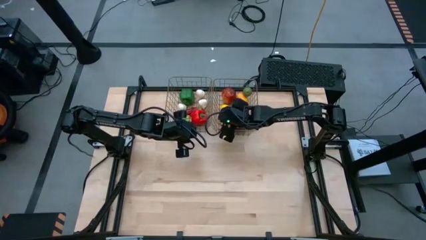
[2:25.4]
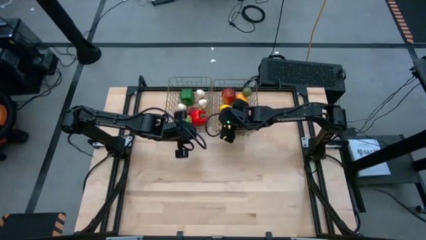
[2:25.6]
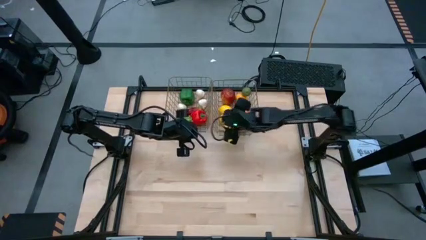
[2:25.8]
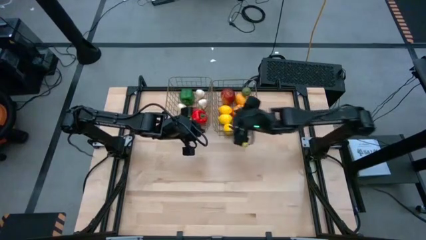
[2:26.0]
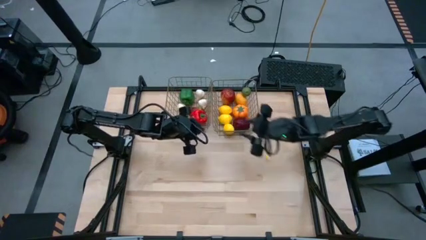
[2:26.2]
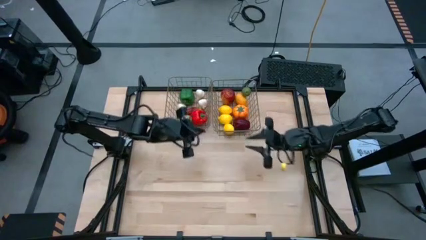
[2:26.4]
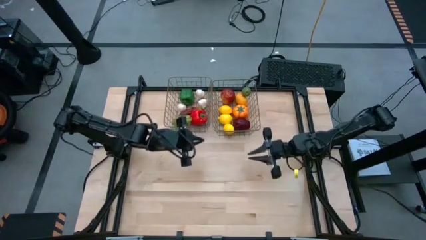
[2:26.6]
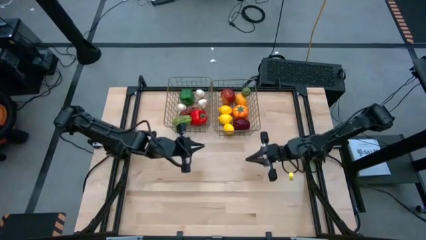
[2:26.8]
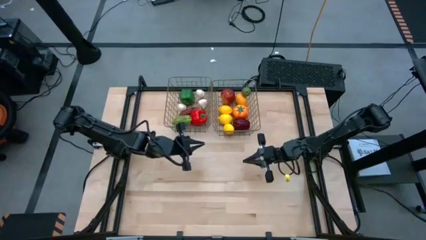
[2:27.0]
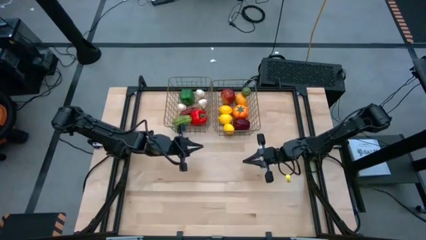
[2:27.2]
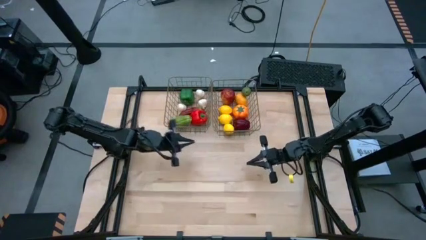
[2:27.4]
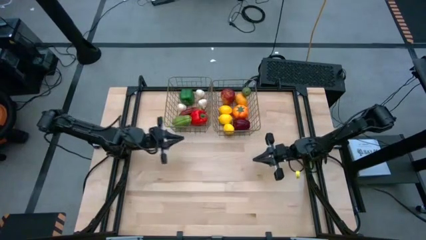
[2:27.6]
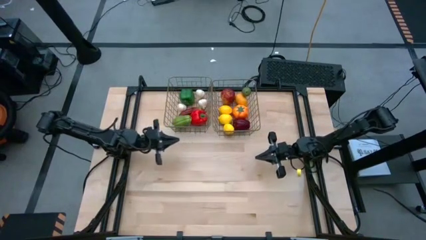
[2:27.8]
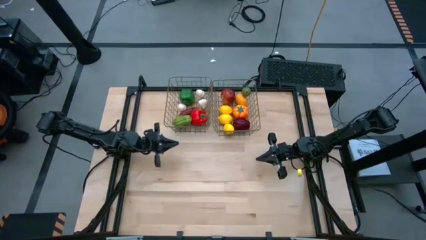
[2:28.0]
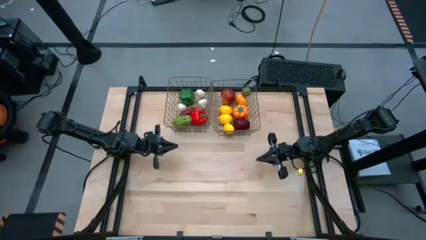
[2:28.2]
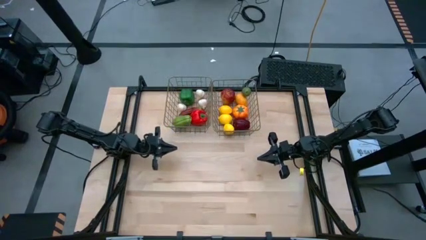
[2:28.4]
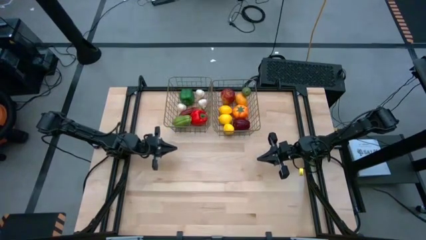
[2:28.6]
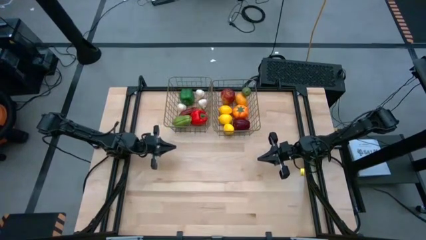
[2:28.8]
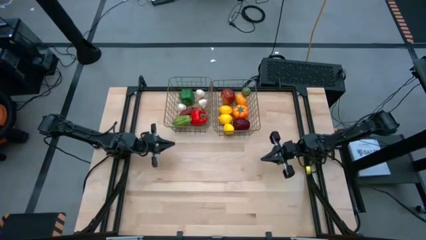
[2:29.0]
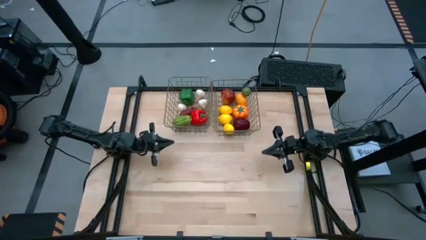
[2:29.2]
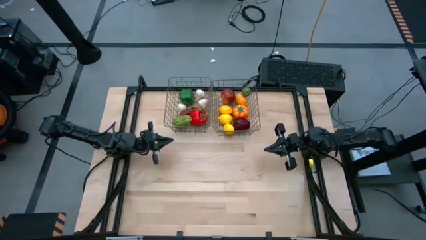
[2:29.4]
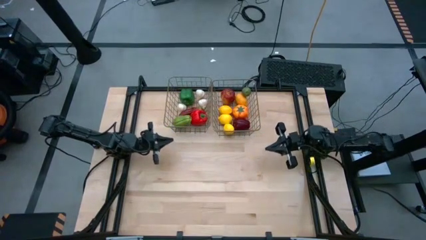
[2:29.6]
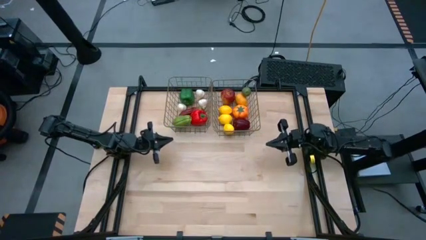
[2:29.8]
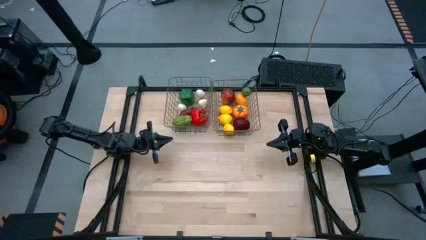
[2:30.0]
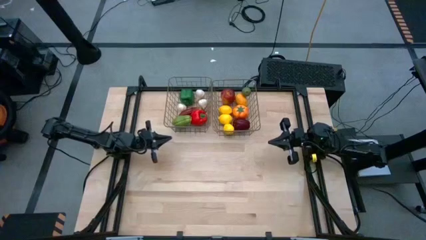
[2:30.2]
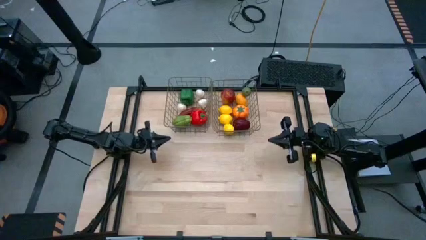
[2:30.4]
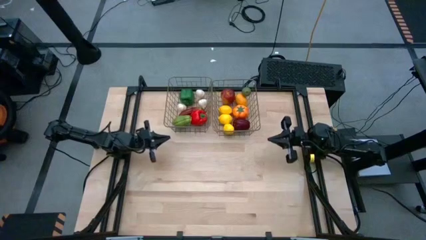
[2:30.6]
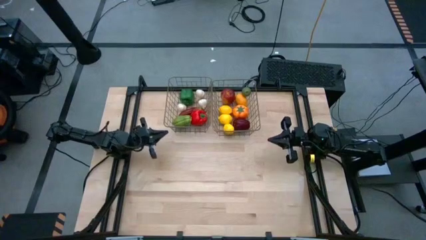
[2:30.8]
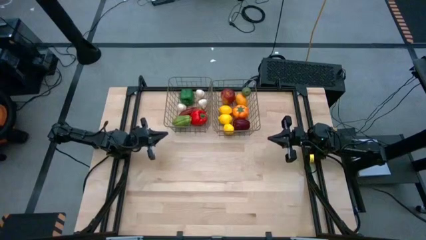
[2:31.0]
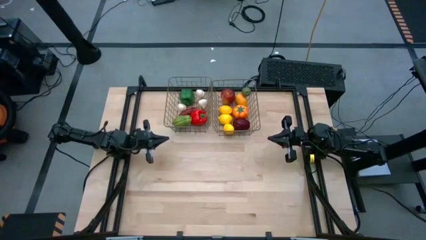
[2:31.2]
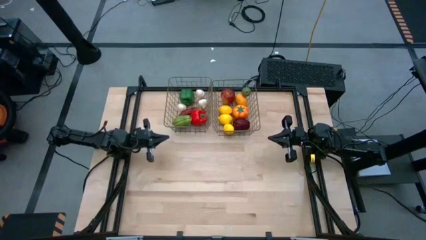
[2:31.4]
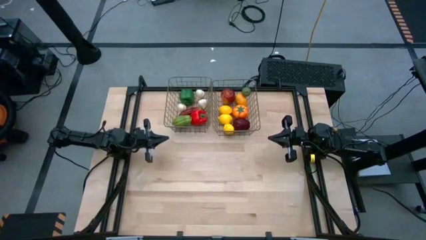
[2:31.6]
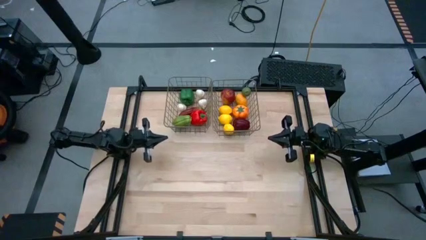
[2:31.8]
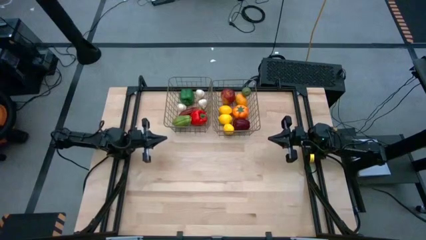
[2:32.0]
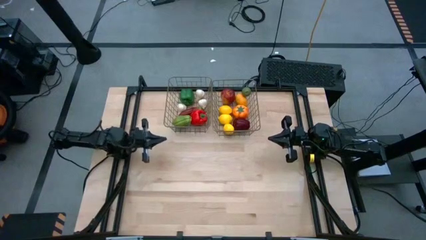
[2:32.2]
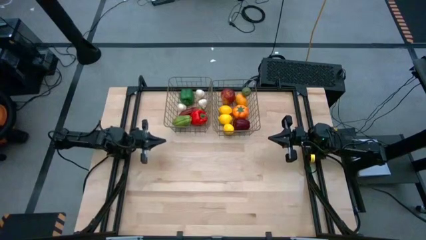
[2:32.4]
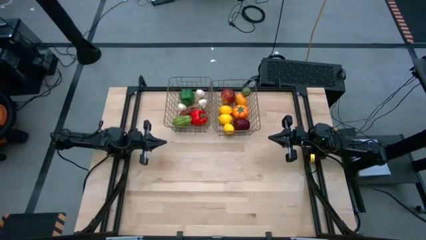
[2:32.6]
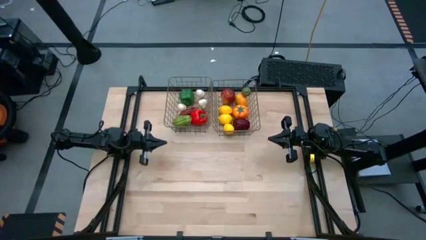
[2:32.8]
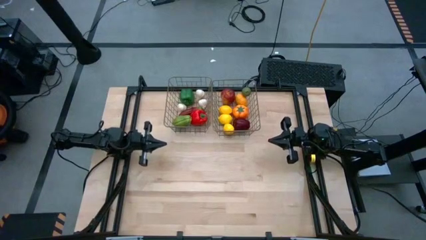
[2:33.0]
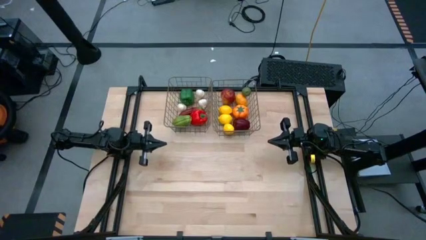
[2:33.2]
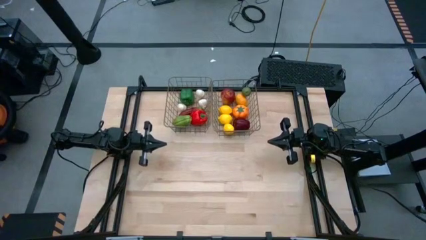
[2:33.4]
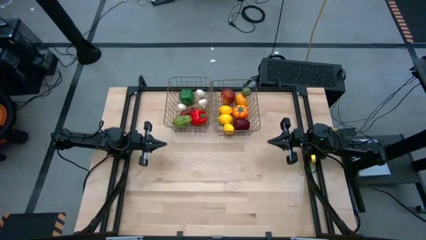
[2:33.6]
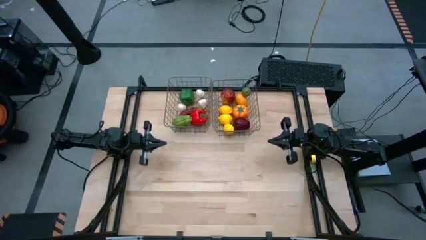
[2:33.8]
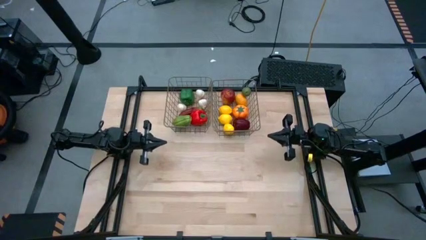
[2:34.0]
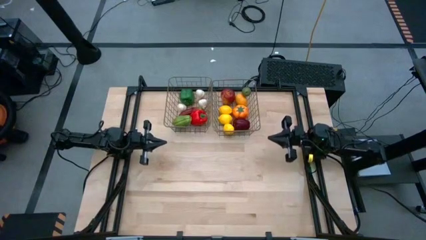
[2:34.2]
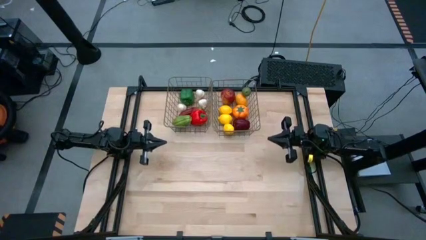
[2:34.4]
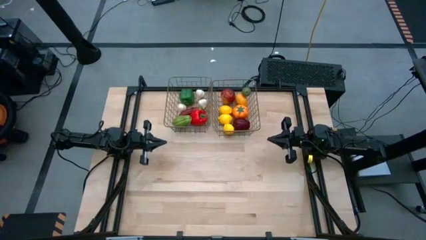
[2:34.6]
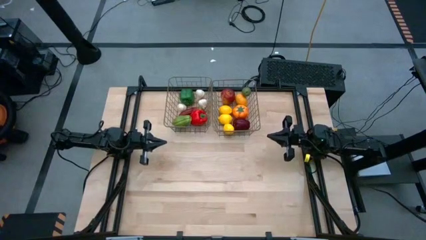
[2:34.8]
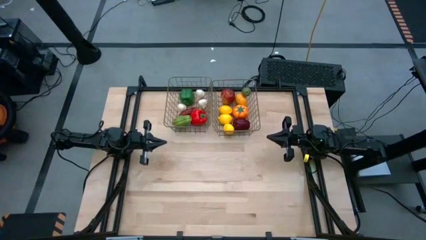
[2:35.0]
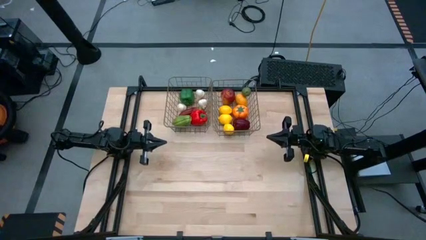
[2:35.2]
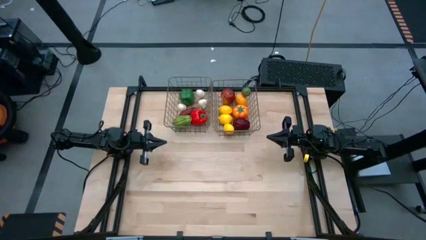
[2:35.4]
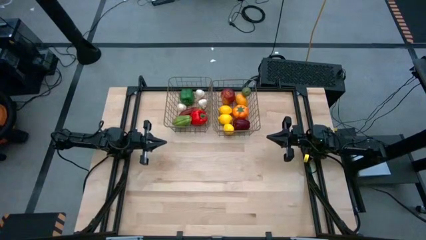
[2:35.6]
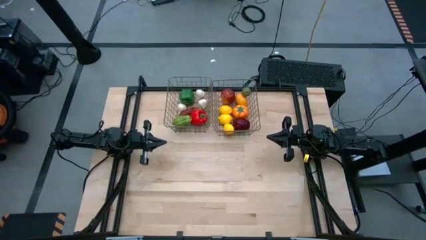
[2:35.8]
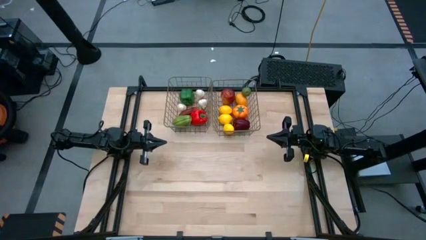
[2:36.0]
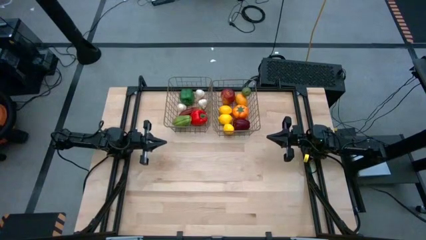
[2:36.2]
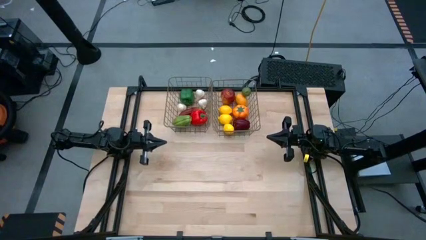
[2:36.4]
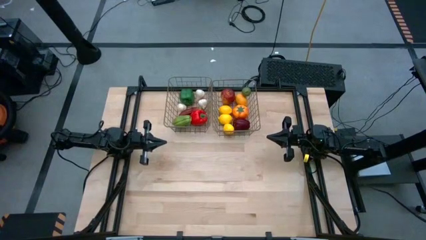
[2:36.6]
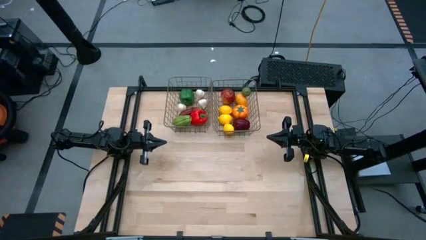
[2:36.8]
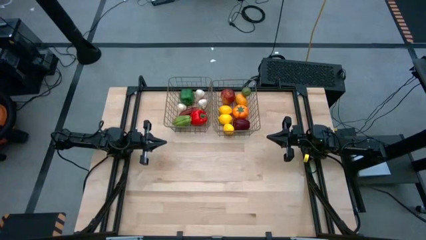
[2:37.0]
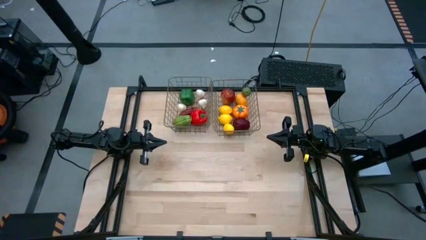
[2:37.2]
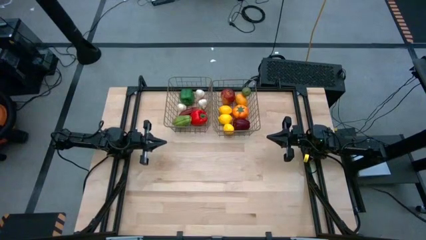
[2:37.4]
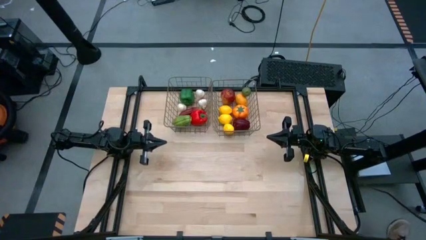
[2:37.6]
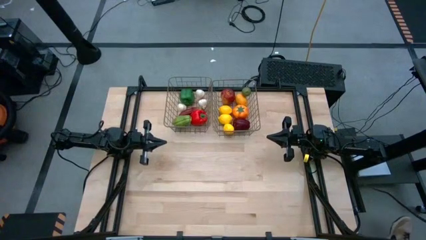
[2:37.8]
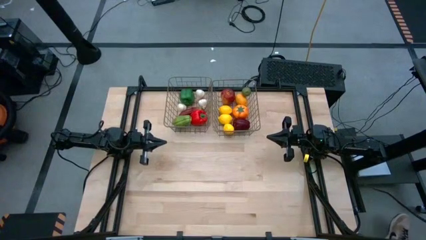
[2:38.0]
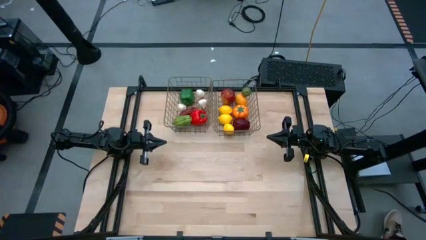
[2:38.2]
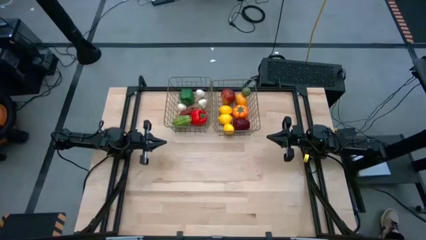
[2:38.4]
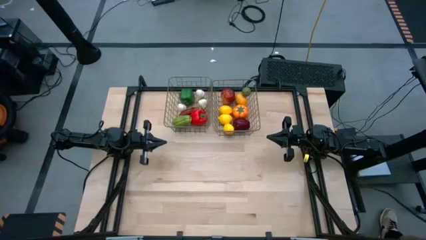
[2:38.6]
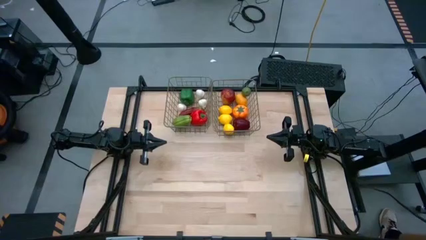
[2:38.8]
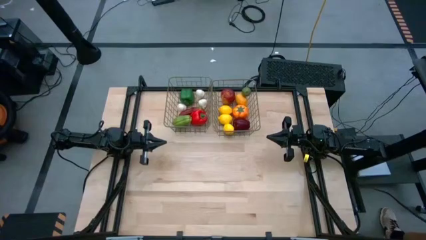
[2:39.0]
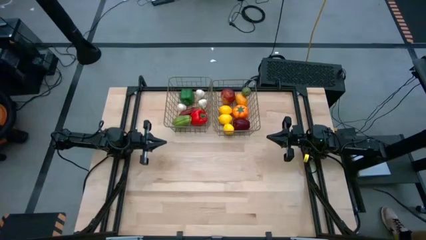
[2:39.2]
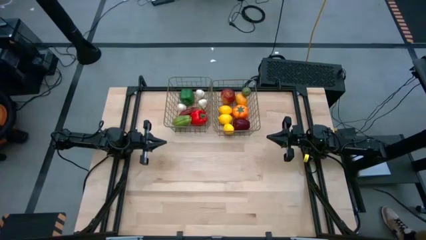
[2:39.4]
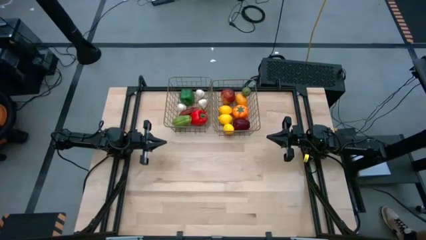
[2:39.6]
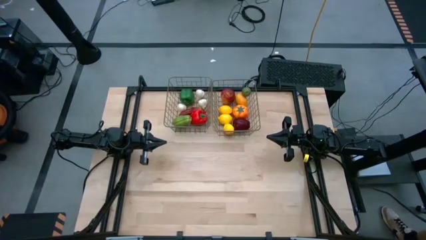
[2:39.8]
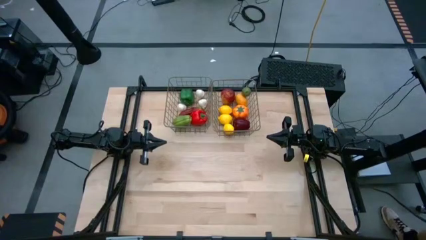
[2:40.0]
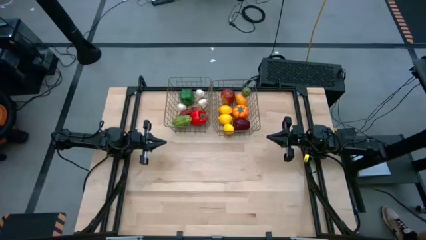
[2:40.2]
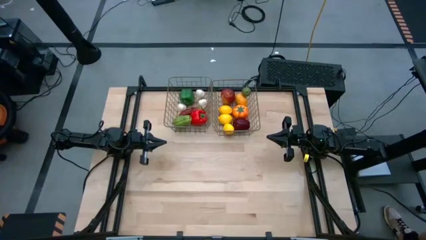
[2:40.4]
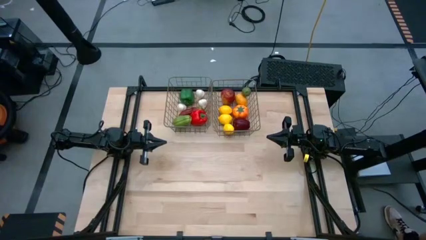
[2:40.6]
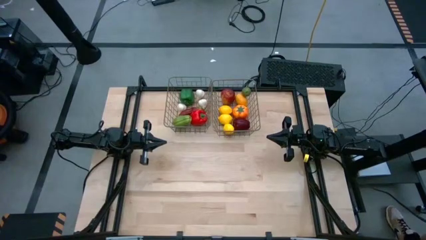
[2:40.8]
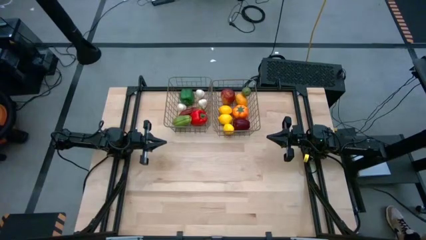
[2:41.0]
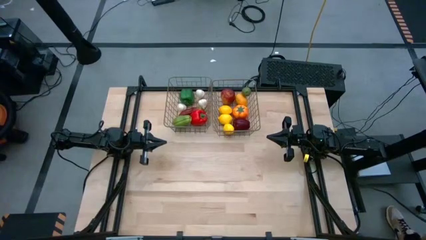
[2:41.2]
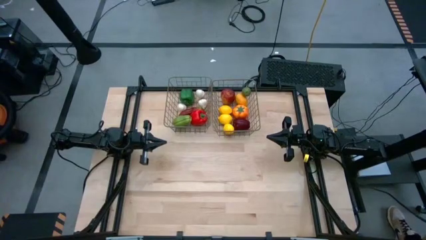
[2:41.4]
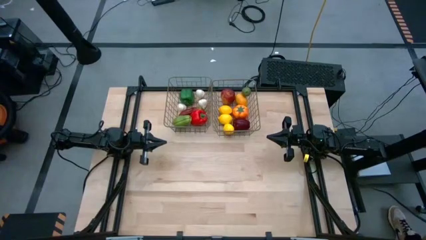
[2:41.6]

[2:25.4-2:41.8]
Task: Sort produce into baskets
Return to Home Position
